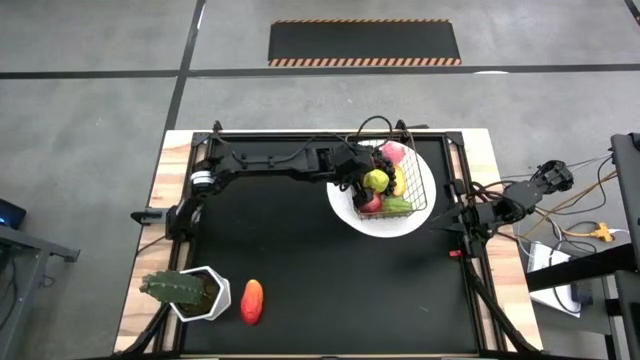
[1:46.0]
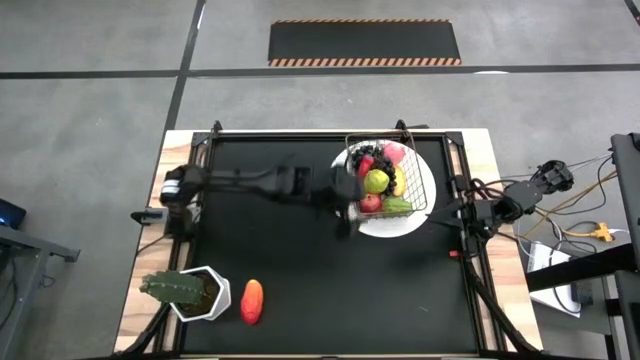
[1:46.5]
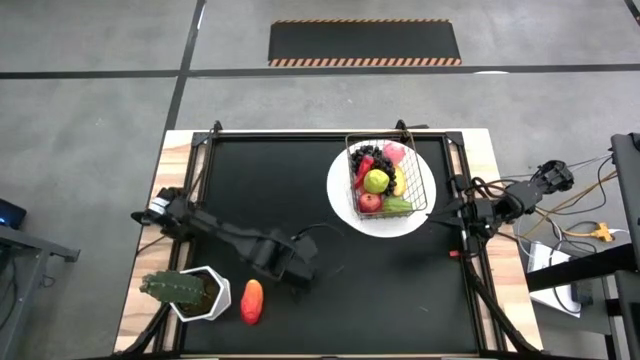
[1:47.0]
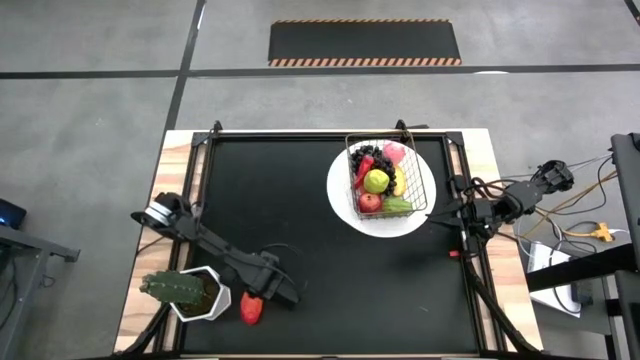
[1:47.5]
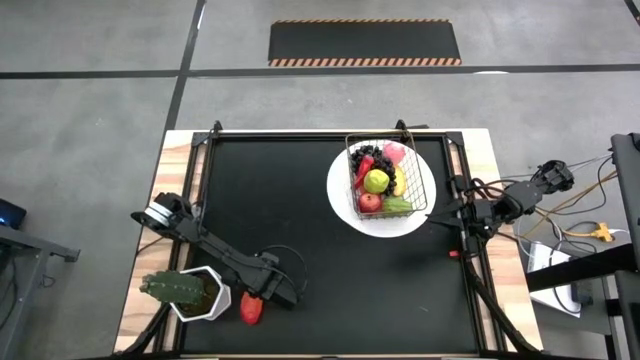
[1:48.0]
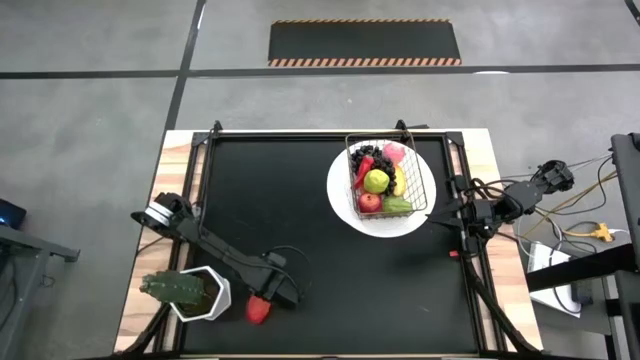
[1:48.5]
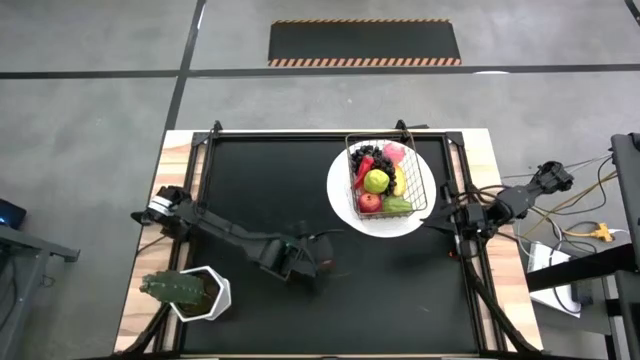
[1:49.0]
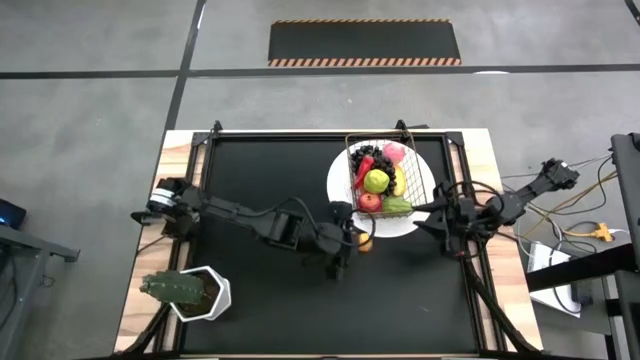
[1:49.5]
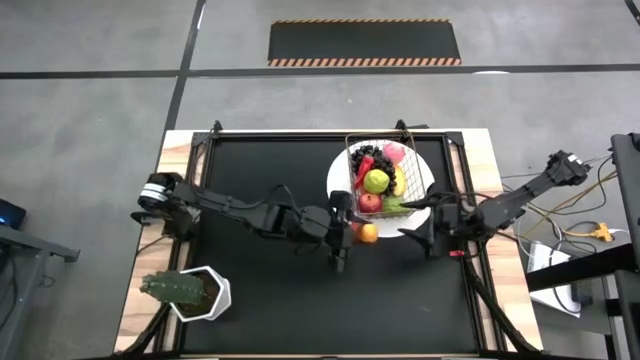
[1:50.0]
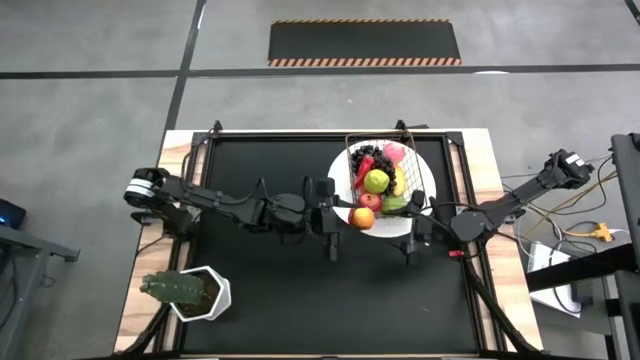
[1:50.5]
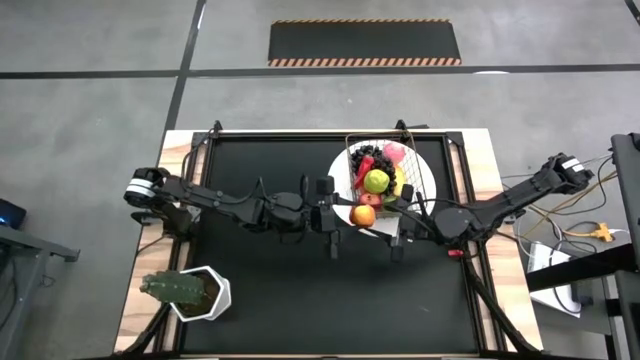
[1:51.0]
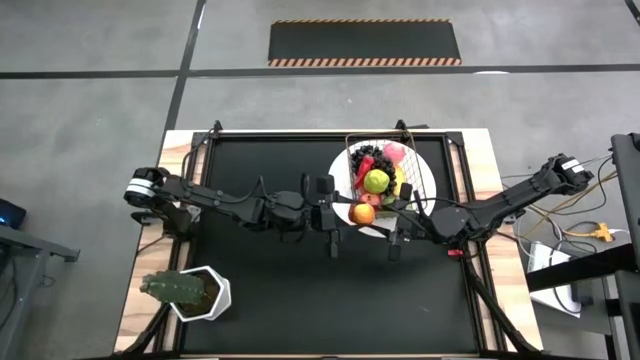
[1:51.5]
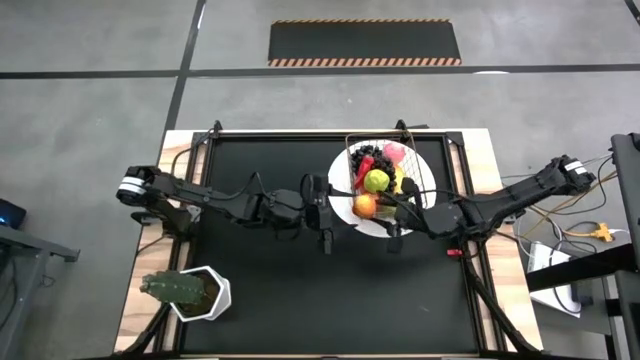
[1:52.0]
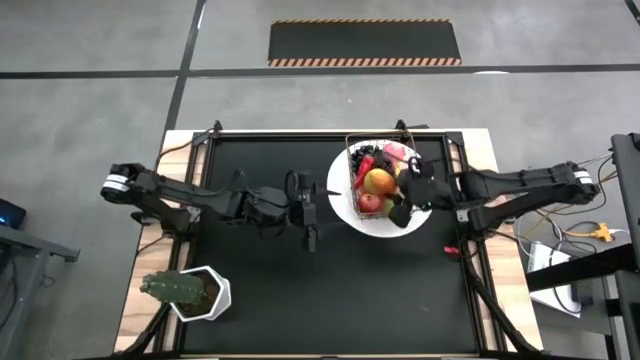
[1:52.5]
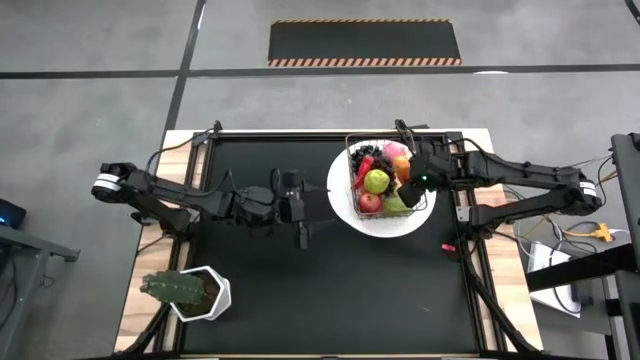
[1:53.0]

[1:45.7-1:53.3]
Task: Build produce basket
Put the orange mango into the wire basket

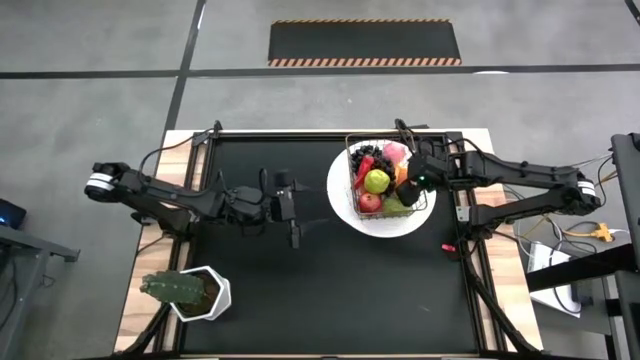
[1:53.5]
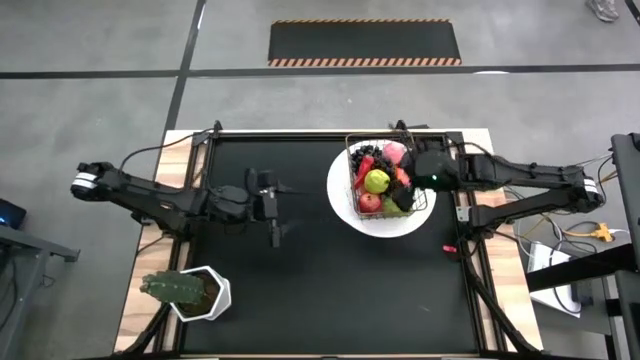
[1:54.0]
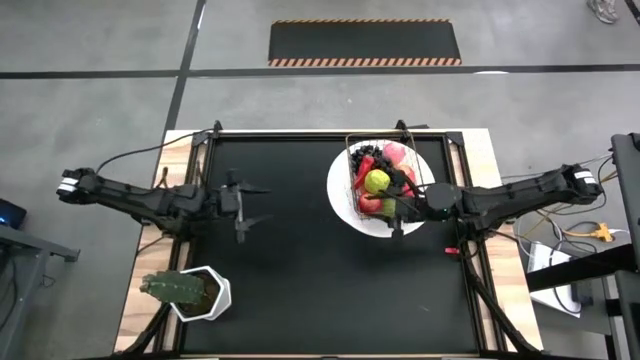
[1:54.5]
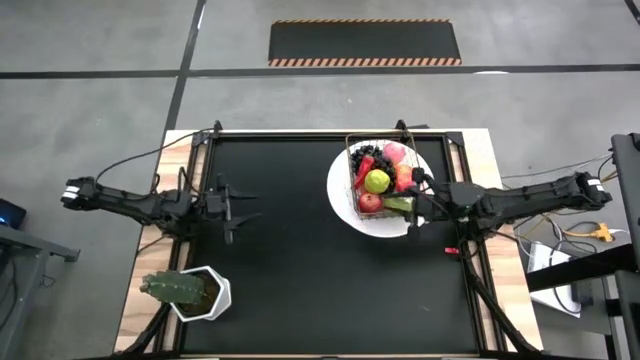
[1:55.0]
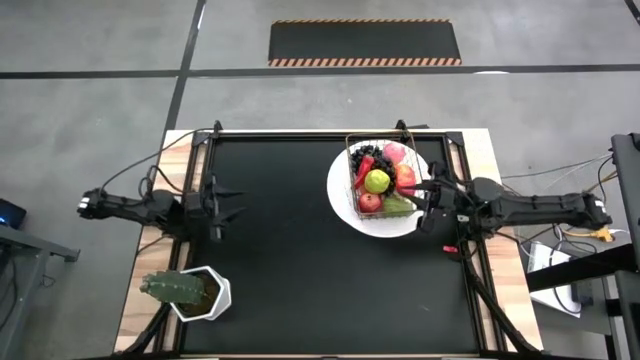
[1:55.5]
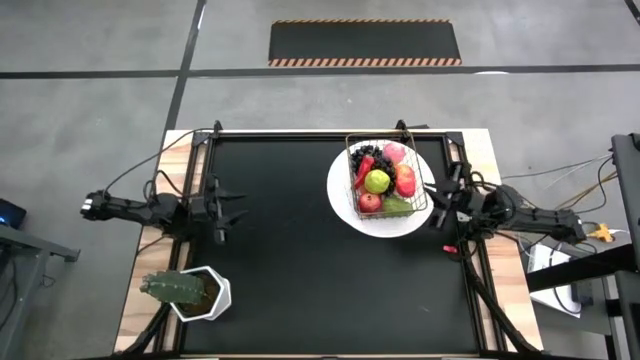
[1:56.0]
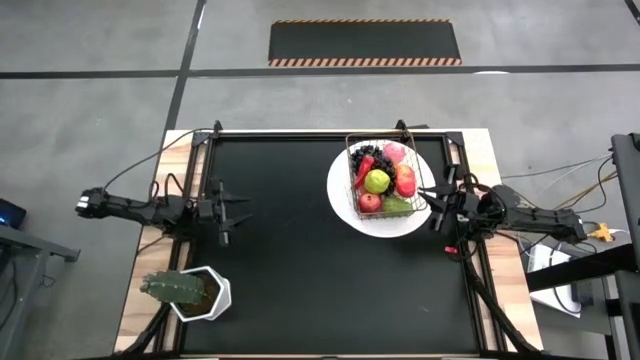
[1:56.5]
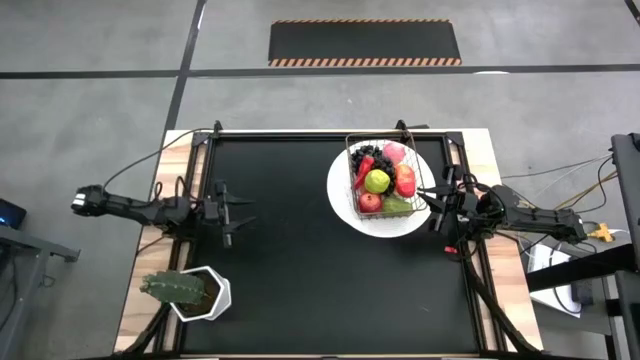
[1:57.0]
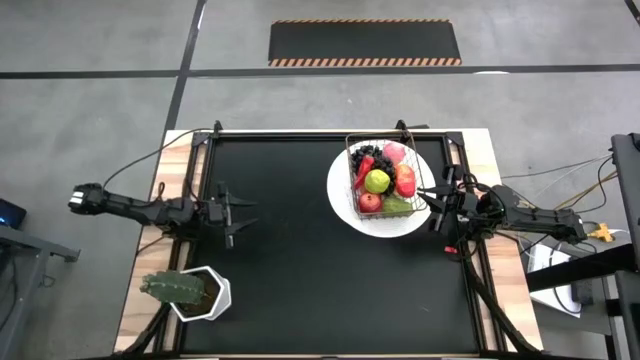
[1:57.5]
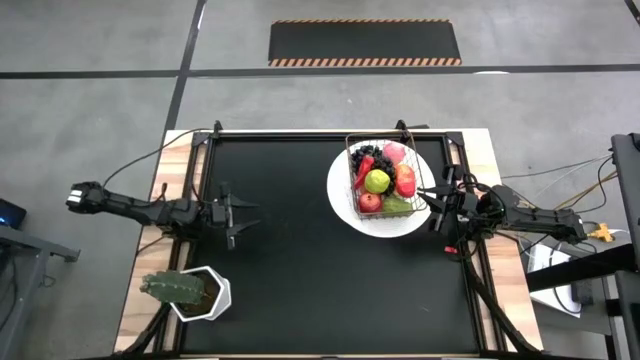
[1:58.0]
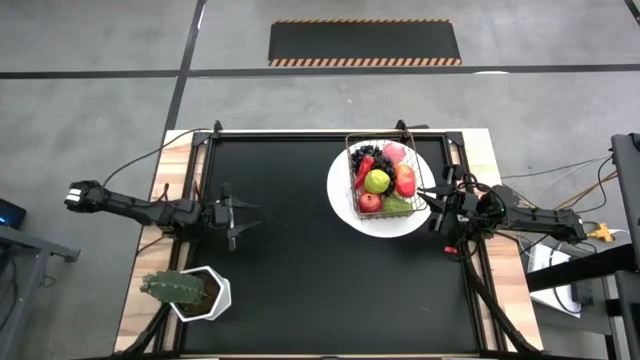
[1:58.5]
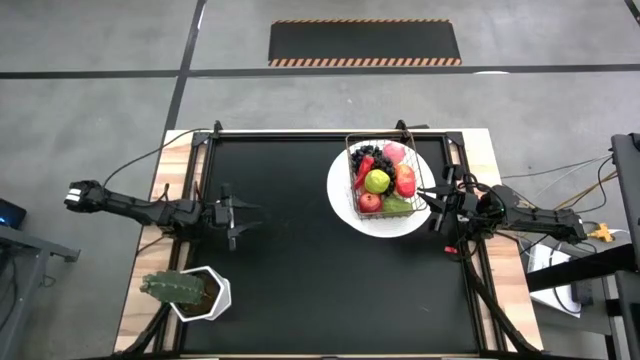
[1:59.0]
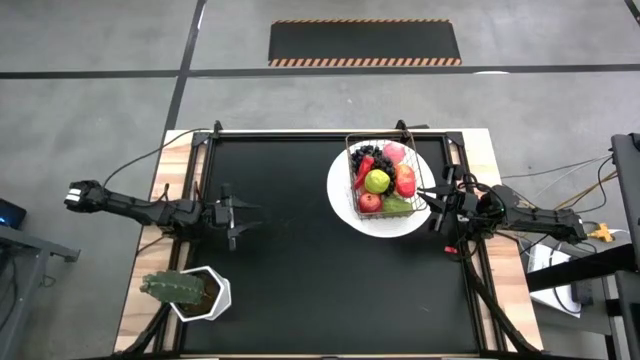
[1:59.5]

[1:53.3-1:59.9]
Return to Home Position

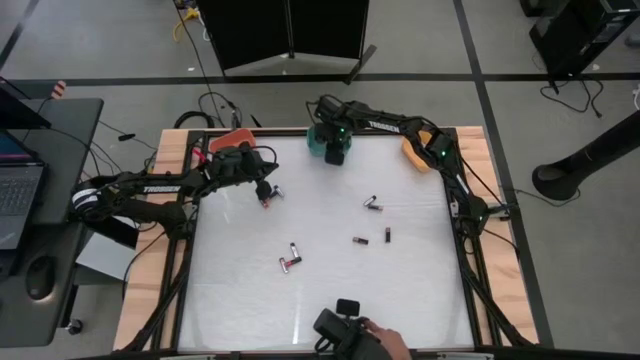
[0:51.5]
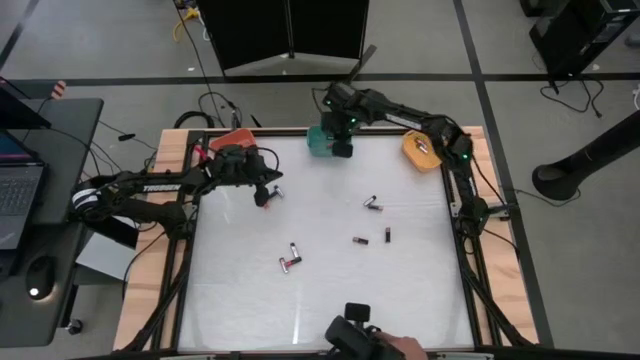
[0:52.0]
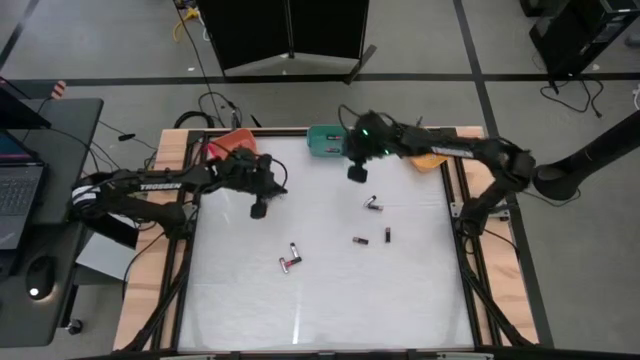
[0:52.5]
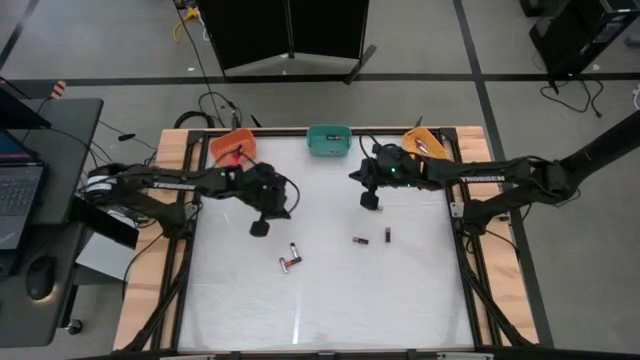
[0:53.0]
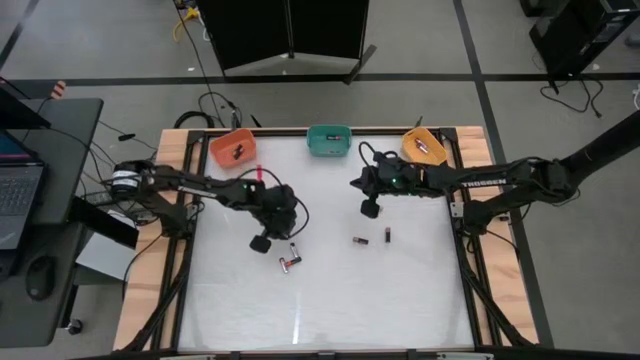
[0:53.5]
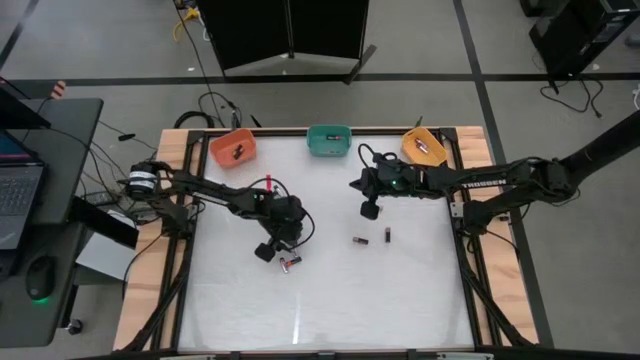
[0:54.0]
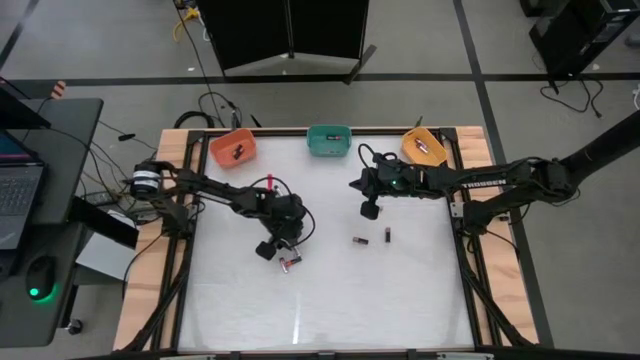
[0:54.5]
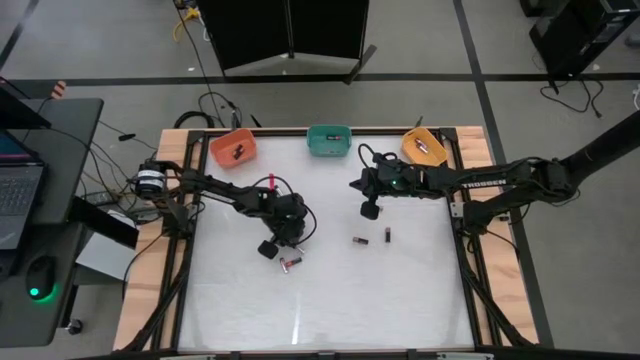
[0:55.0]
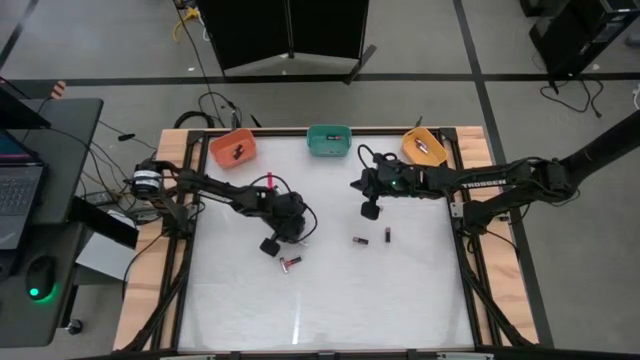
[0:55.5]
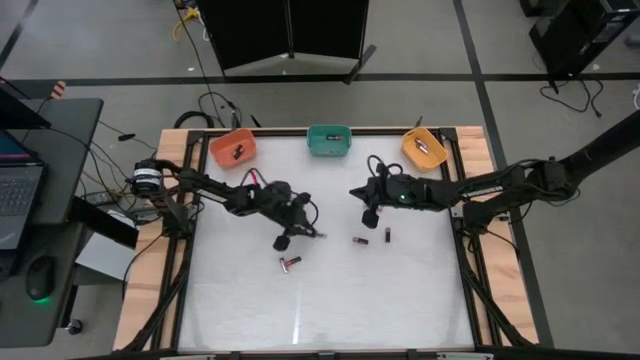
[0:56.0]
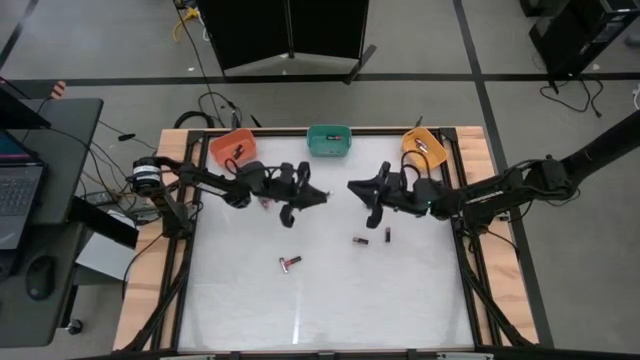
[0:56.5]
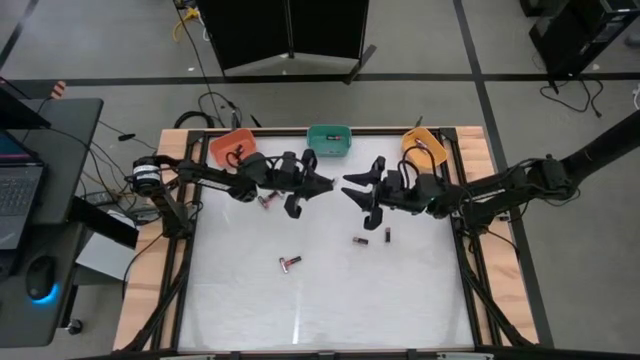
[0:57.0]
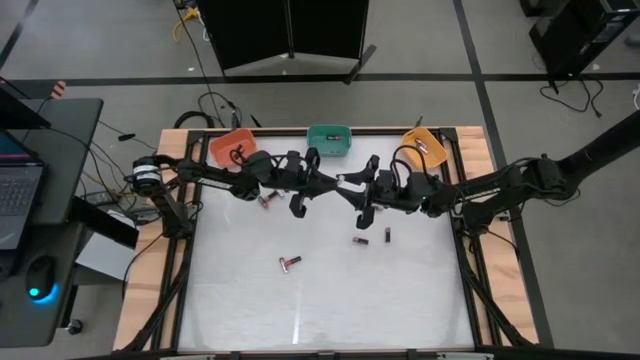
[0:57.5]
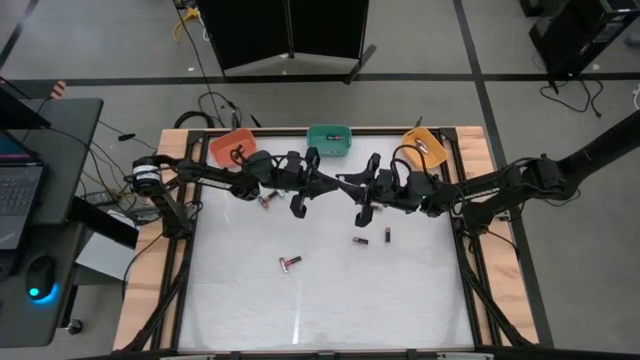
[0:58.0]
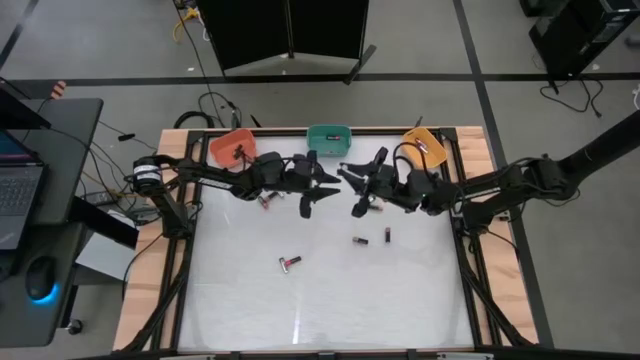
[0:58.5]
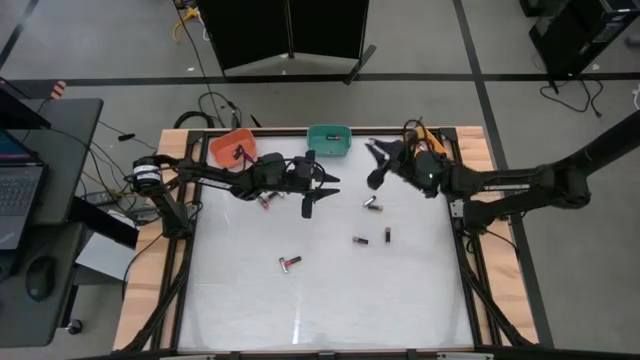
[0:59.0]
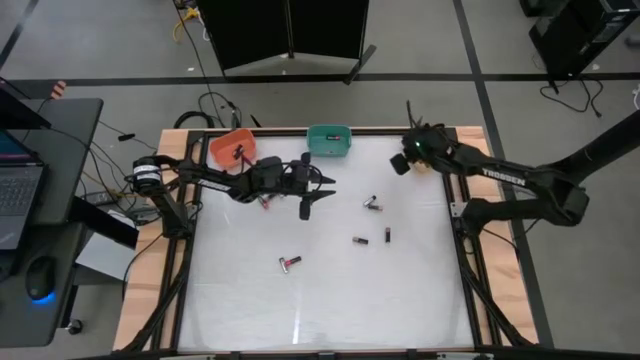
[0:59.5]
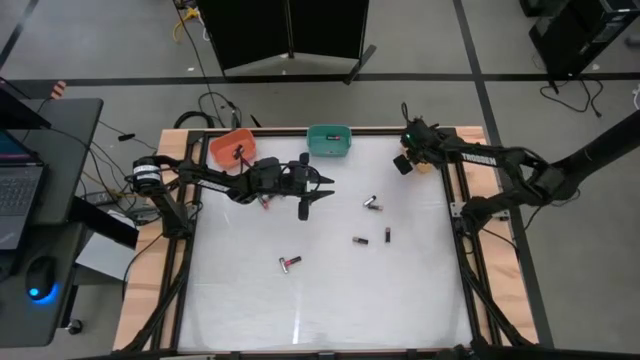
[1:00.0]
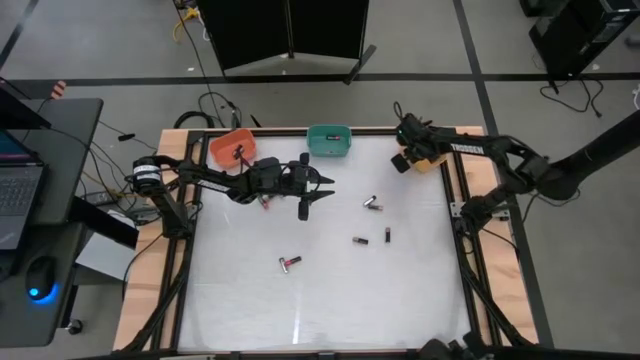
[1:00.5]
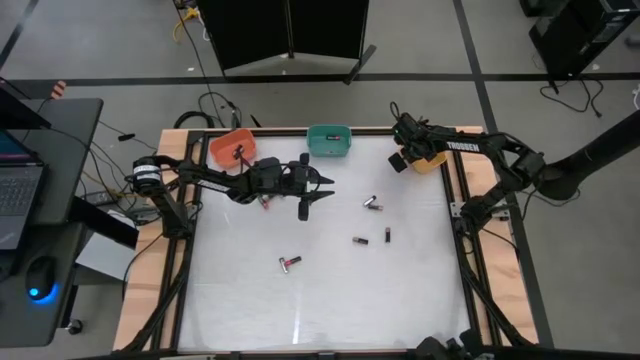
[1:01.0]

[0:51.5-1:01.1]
Task: Sort batteries
Put the silver battery into the yellow bin
